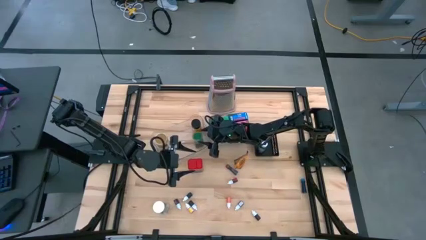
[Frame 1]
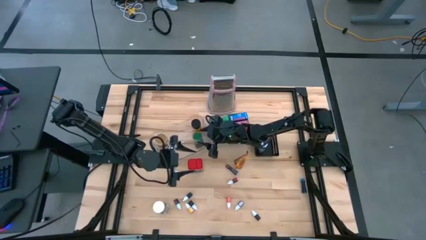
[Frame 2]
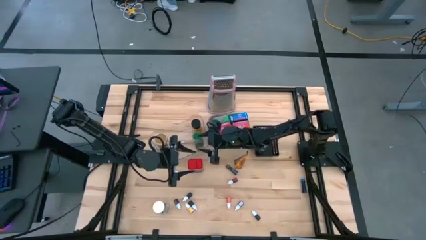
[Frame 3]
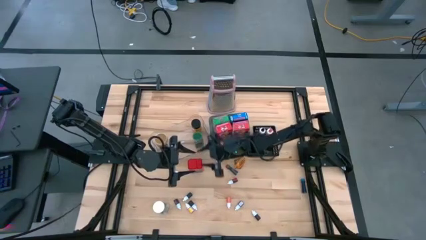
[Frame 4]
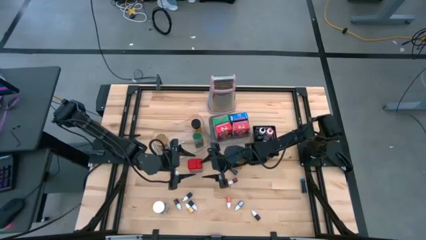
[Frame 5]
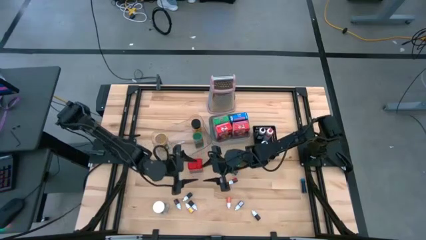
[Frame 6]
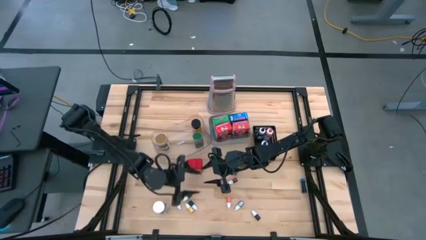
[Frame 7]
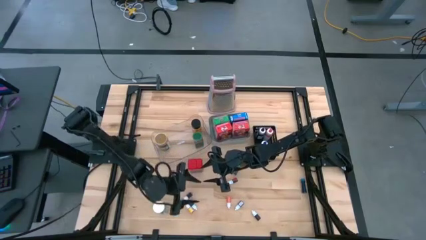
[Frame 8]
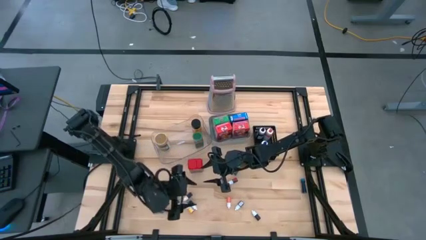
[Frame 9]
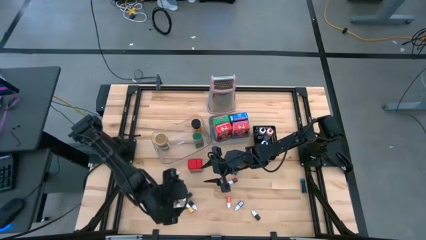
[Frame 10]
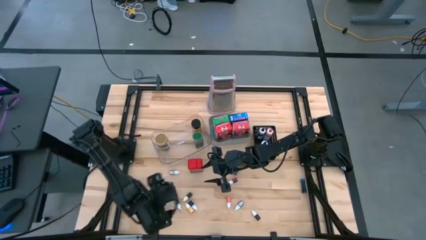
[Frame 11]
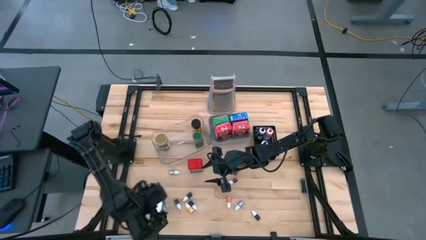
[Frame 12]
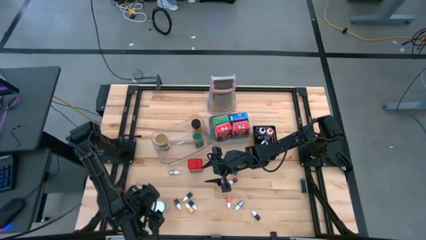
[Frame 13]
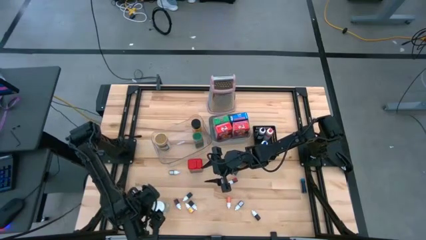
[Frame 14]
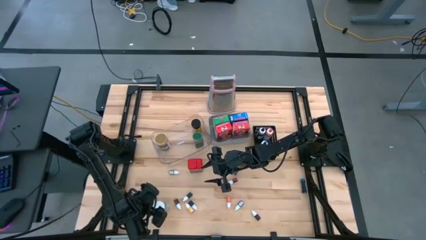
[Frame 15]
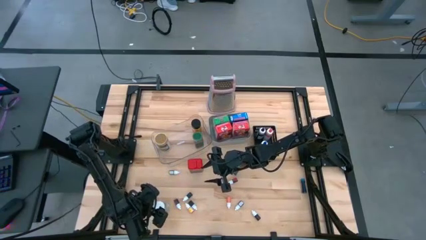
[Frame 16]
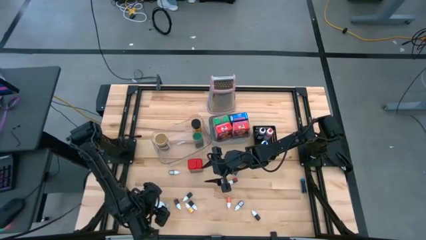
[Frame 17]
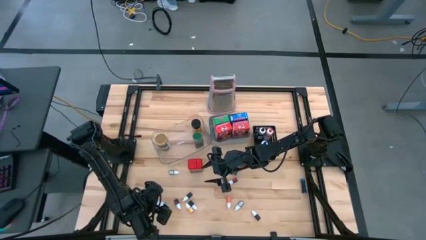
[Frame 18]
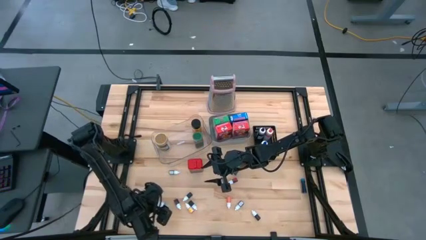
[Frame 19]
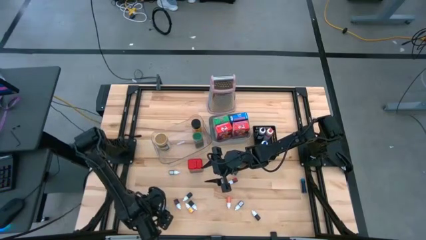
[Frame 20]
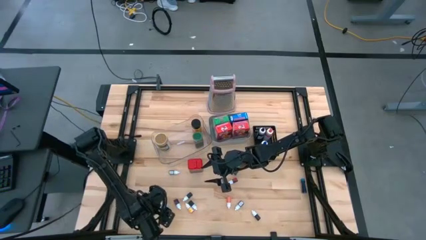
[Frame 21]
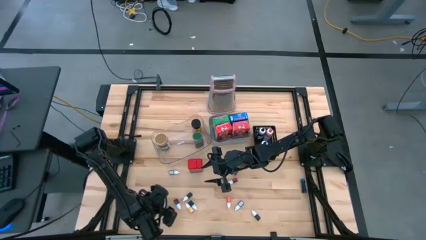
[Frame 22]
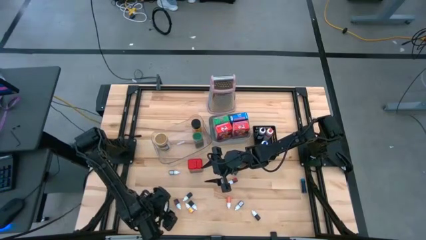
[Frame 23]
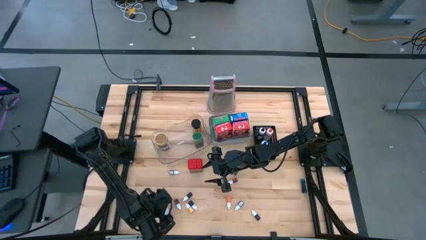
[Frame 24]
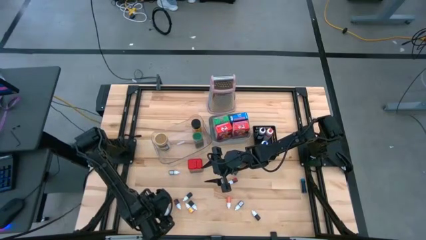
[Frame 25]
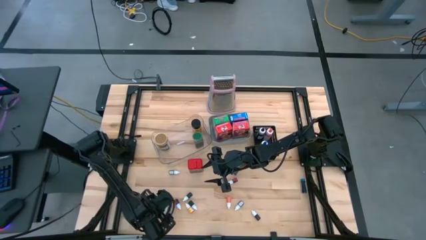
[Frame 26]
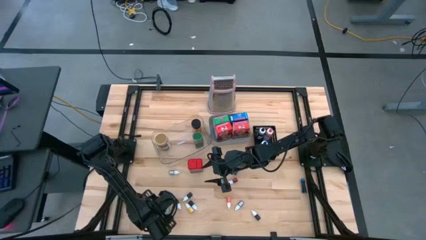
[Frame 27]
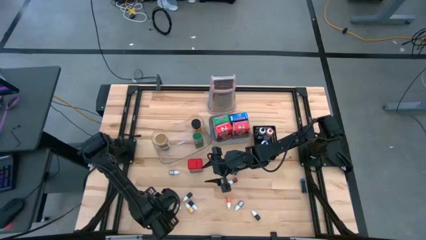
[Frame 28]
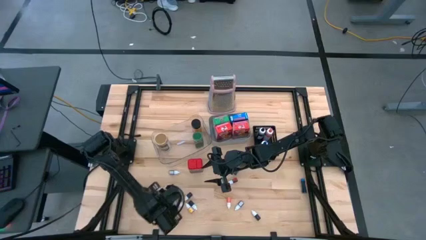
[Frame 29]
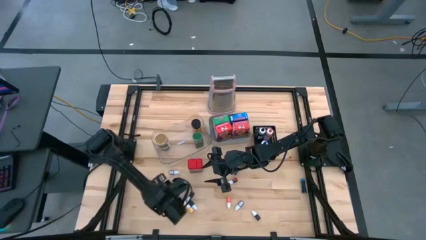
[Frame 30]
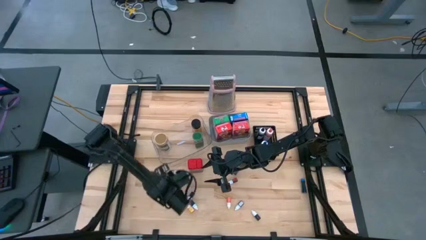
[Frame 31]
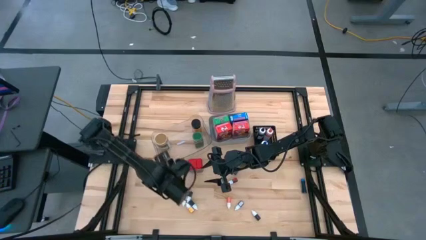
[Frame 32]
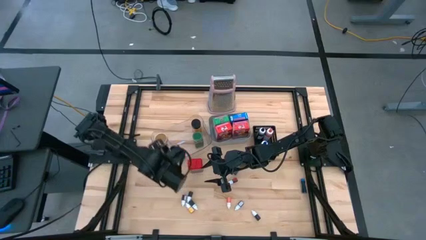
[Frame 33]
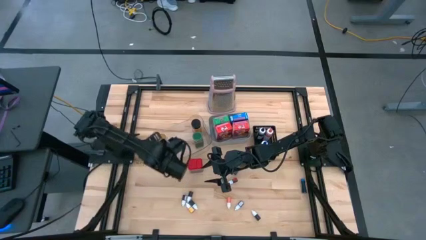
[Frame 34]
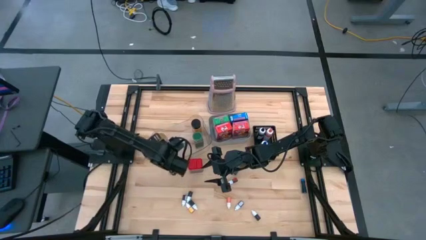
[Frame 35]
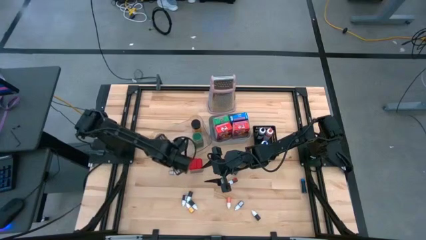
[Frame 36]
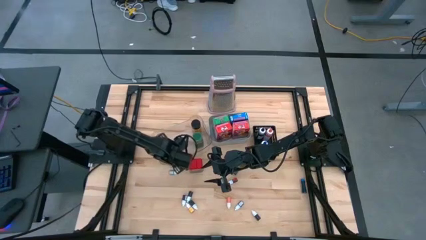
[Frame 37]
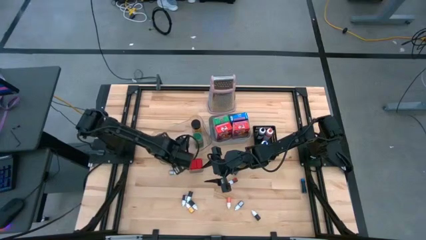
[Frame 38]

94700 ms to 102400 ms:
Task: Pick & Place Kitchen Items
Put the white seasoning bottle into the transparent bin

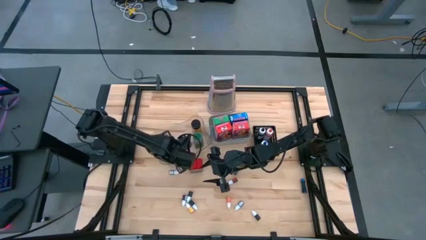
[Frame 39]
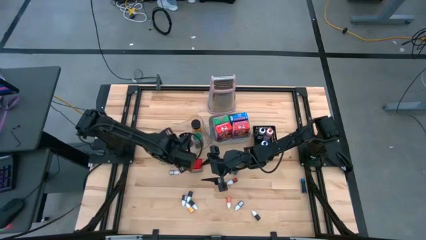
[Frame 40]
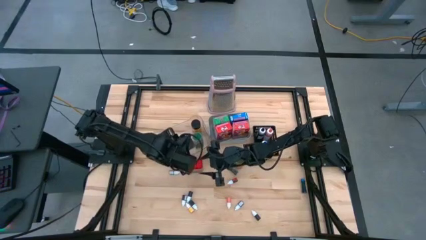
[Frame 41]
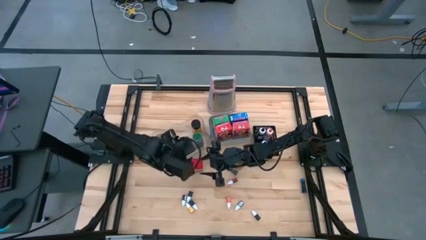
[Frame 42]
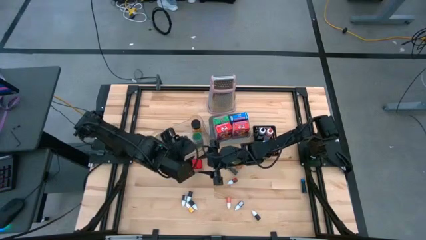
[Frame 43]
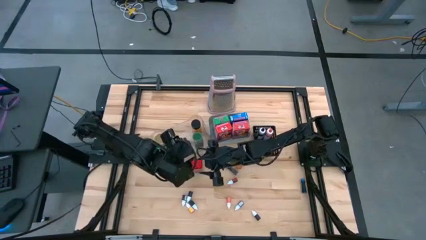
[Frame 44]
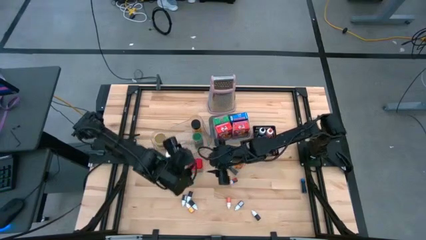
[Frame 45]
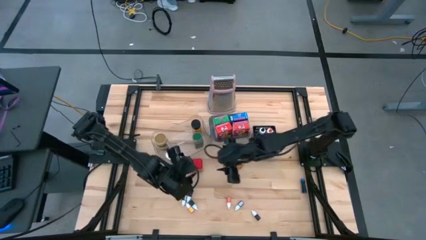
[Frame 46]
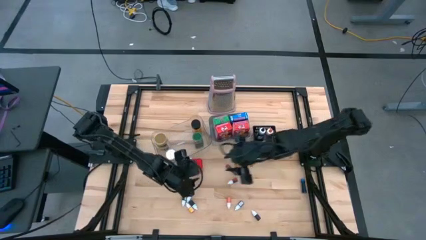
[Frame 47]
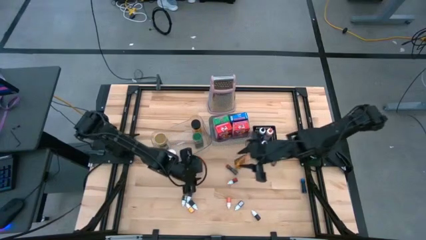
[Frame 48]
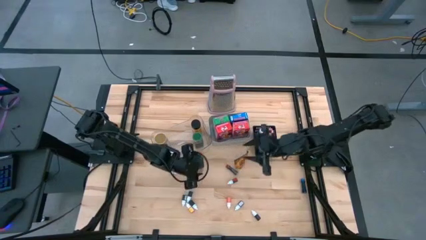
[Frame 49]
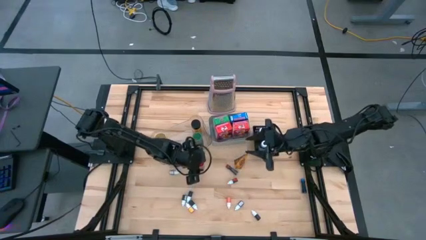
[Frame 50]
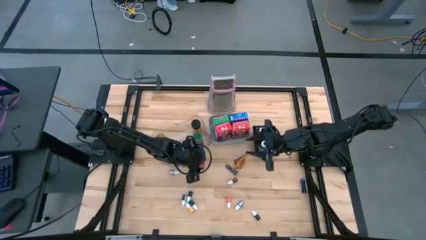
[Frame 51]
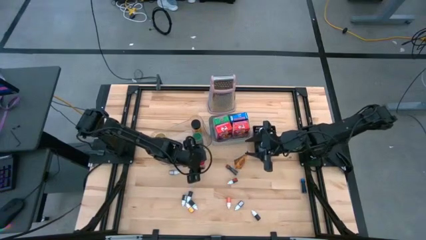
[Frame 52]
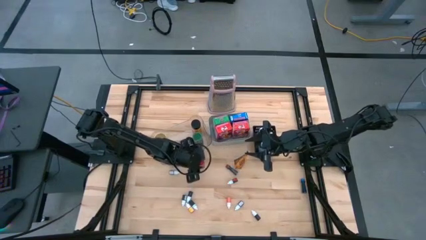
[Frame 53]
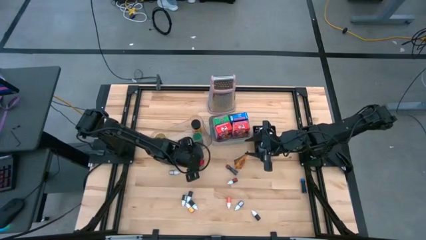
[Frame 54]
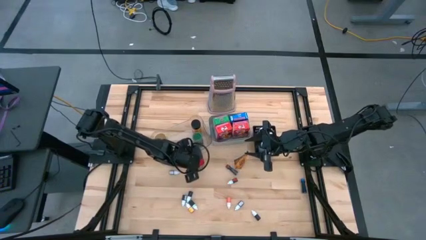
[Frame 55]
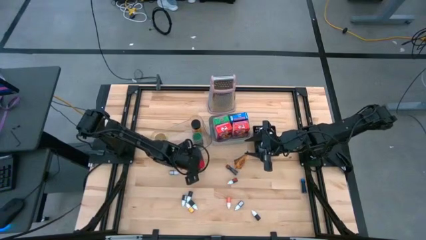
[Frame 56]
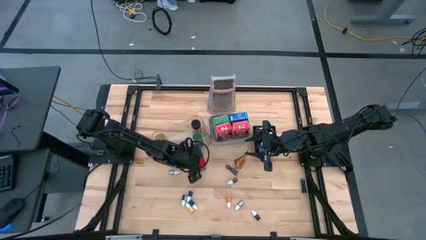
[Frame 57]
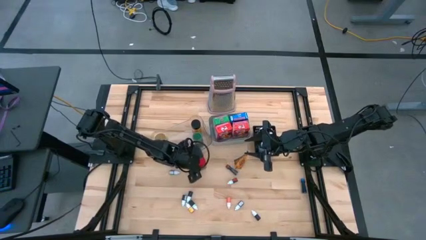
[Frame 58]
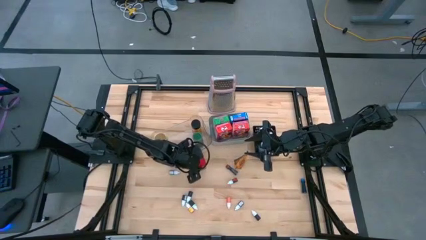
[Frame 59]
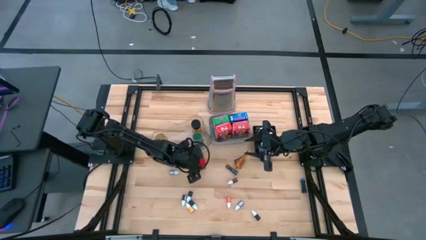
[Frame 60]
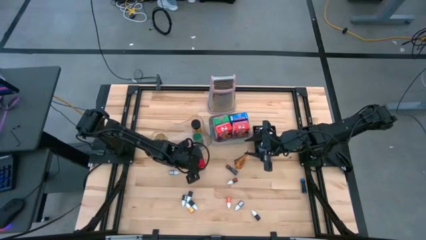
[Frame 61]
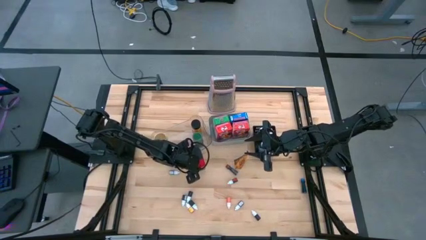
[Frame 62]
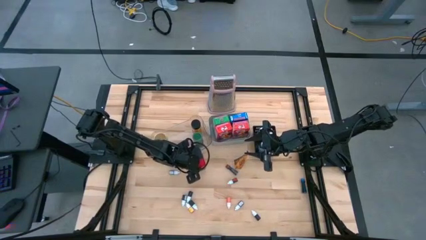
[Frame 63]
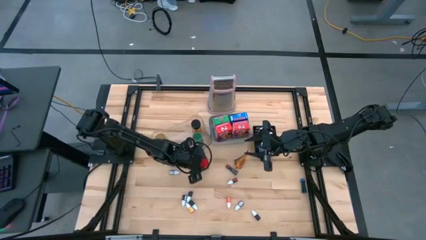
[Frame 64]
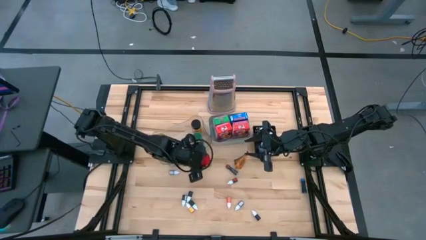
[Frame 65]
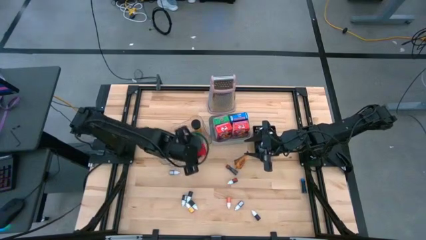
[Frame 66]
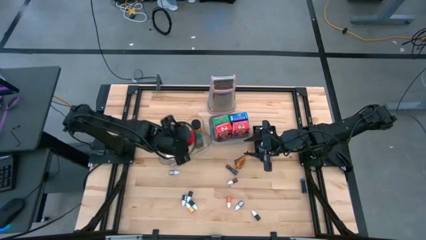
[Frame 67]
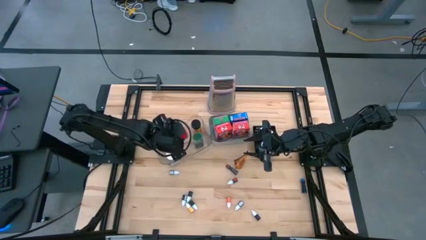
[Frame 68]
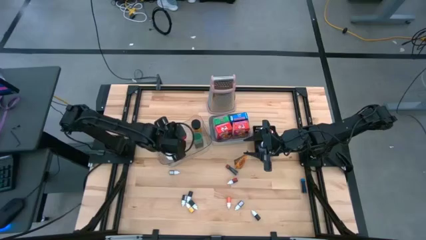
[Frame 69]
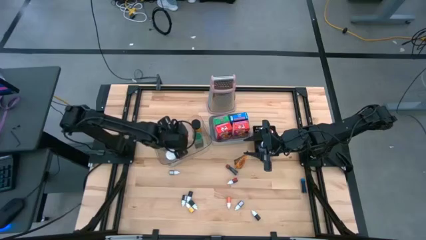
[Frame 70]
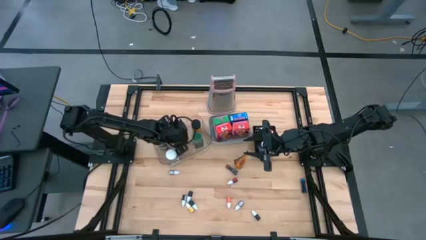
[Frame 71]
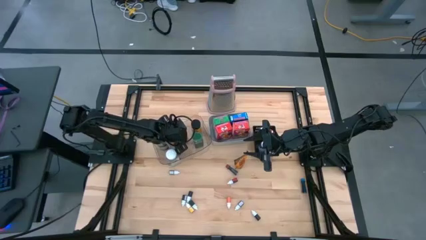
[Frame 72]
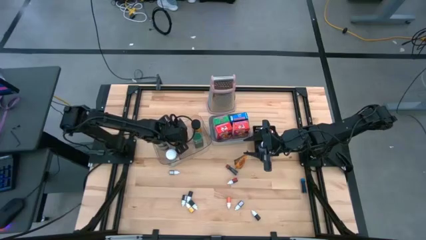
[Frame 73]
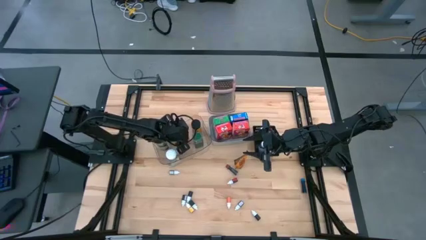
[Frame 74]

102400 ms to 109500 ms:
Put the red seasoning can into the transparent bin

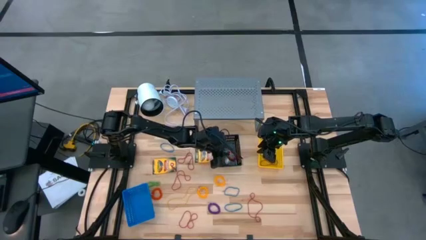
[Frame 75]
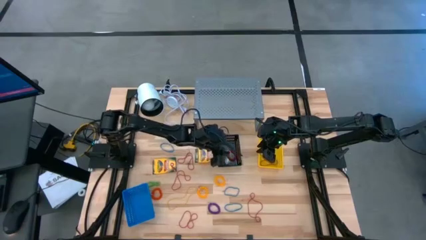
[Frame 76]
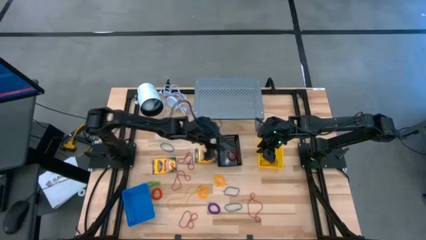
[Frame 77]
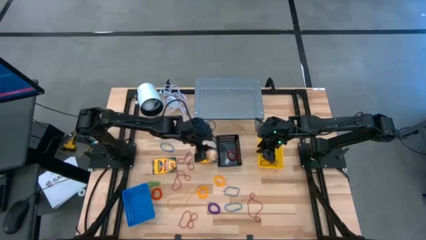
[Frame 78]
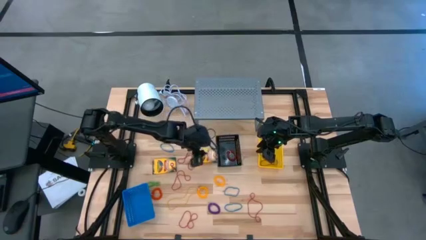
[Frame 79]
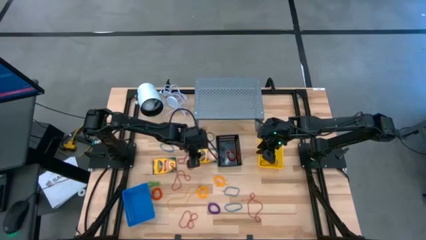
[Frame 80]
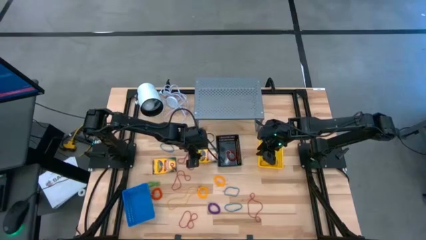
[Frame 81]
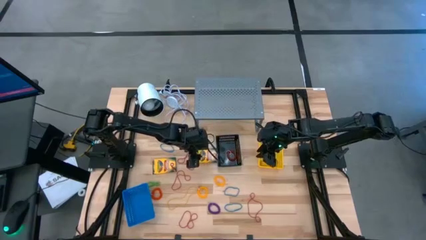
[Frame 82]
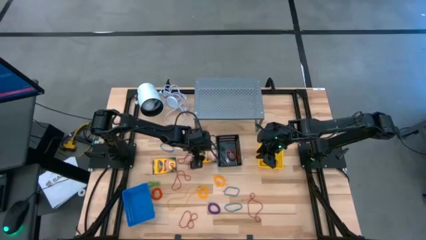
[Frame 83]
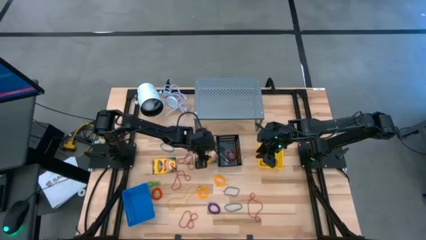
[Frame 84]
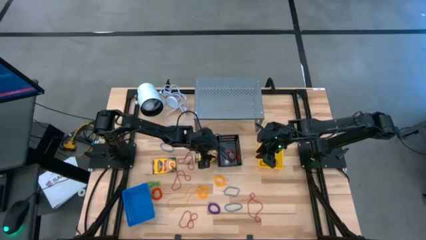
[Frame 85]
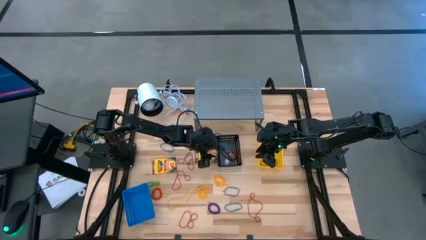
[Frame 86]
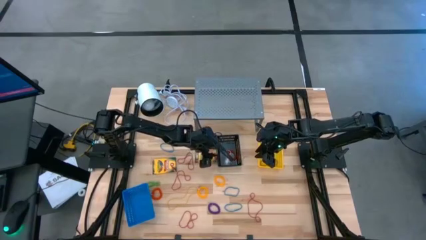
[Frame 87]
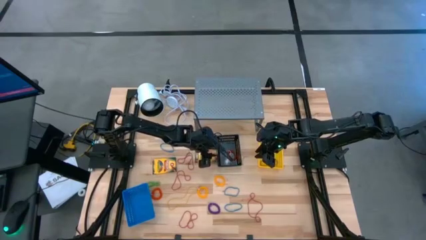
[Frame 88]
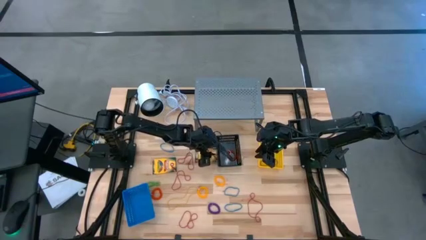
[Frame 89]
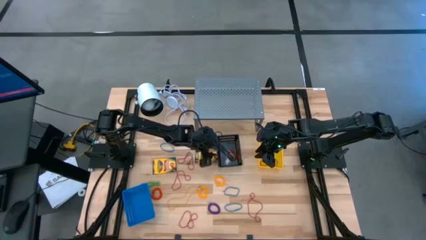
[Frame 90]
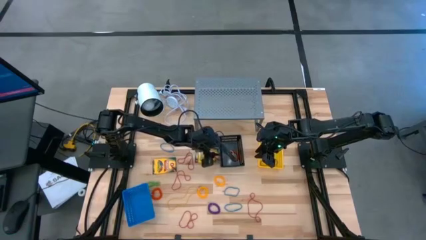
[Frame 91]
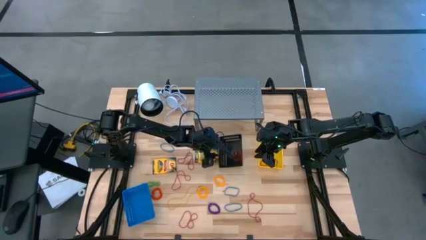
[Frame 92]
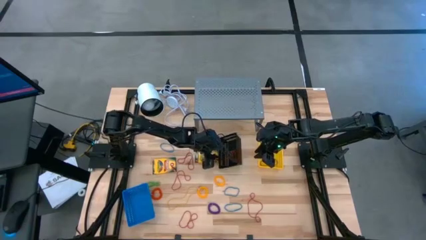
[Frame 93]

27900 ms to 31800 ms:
Task: Pick & Place Office Desk Supplies
Adjust the black basket
